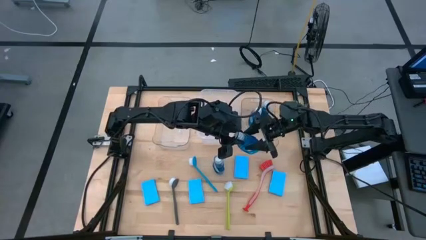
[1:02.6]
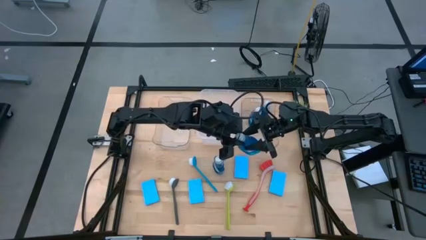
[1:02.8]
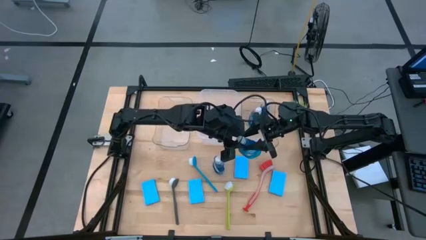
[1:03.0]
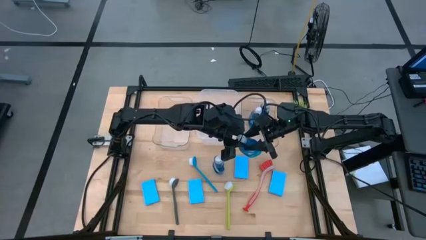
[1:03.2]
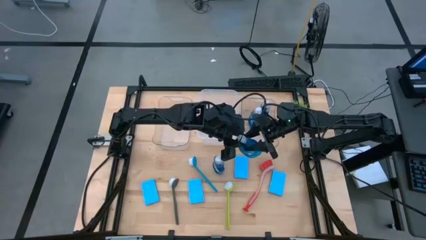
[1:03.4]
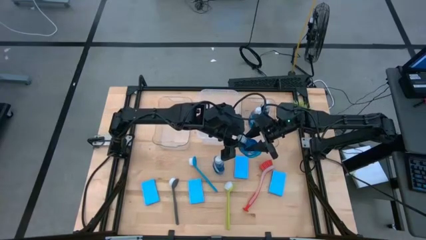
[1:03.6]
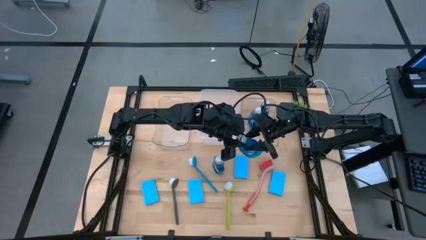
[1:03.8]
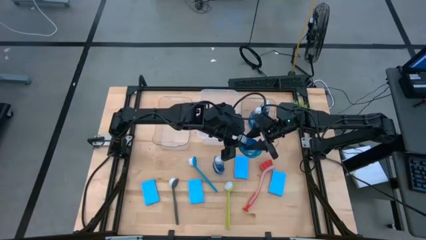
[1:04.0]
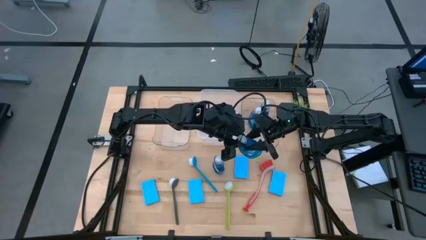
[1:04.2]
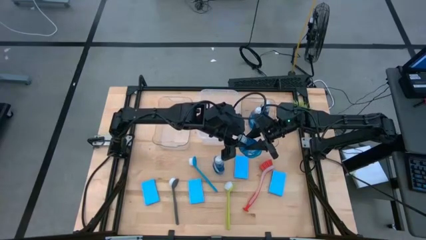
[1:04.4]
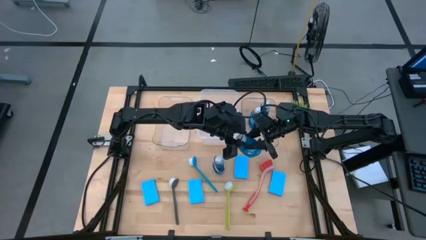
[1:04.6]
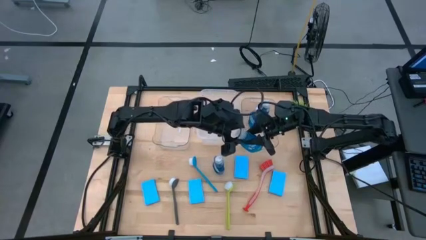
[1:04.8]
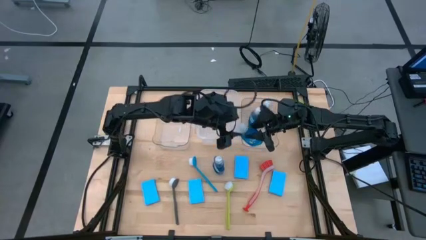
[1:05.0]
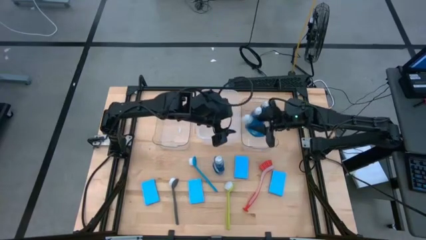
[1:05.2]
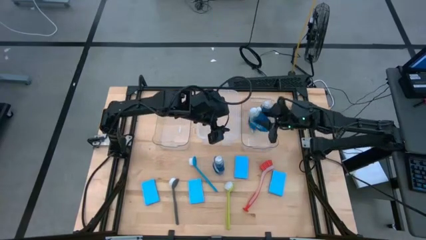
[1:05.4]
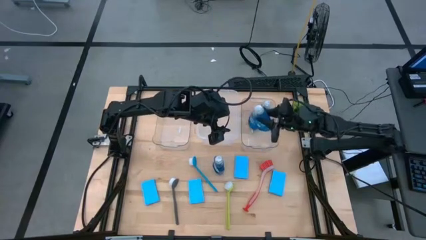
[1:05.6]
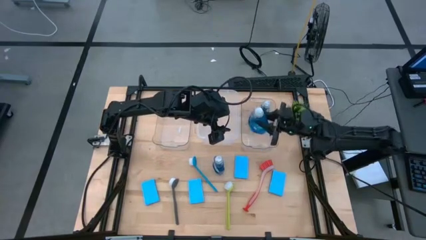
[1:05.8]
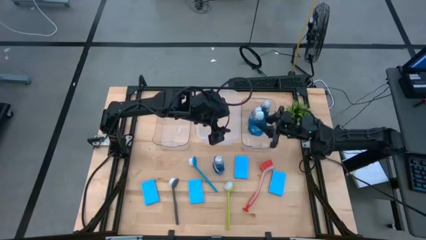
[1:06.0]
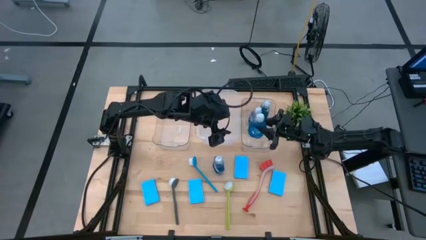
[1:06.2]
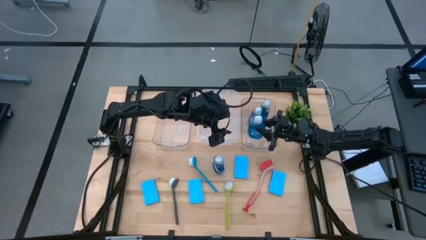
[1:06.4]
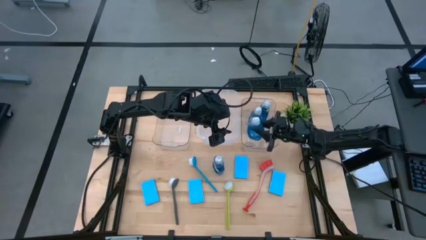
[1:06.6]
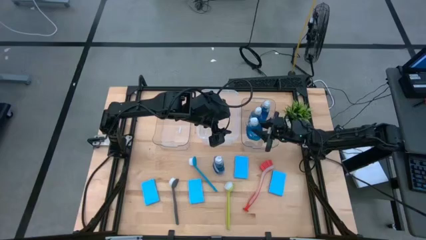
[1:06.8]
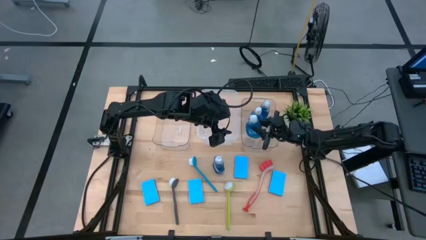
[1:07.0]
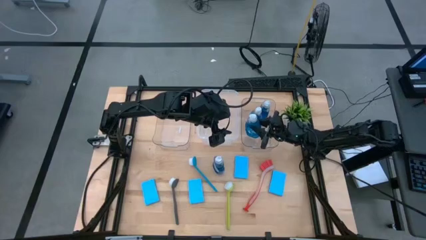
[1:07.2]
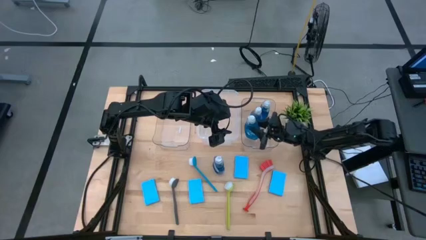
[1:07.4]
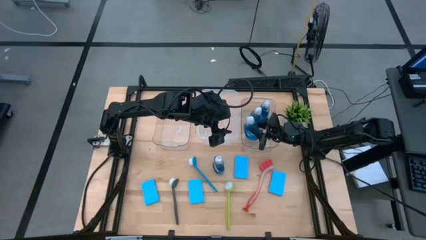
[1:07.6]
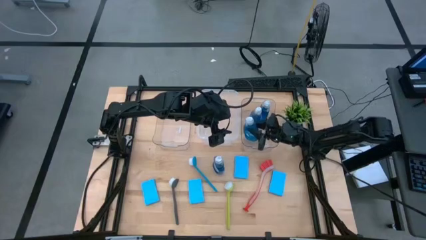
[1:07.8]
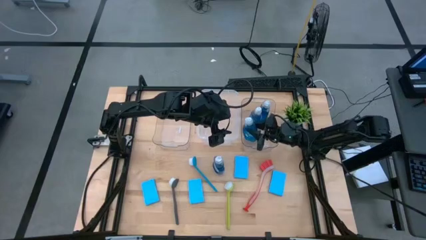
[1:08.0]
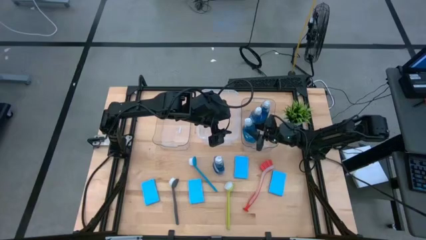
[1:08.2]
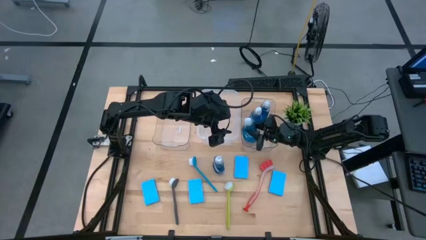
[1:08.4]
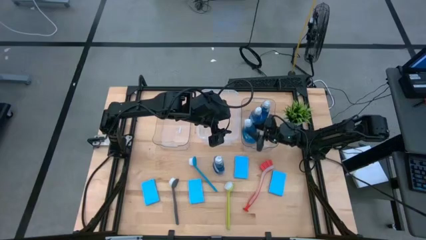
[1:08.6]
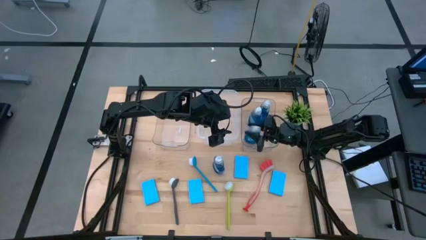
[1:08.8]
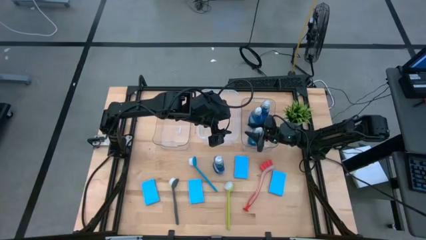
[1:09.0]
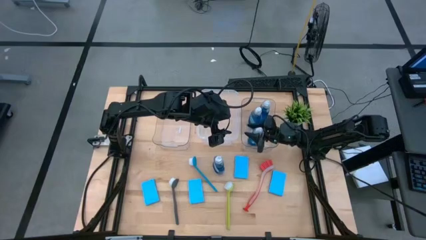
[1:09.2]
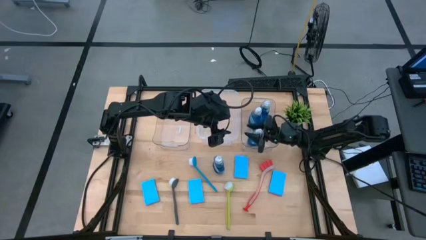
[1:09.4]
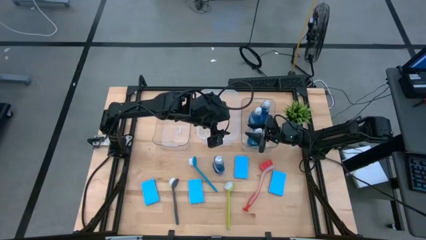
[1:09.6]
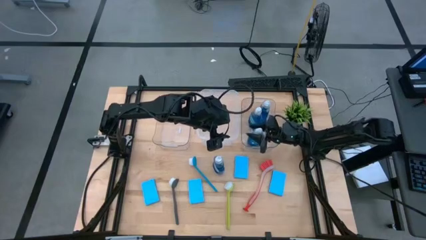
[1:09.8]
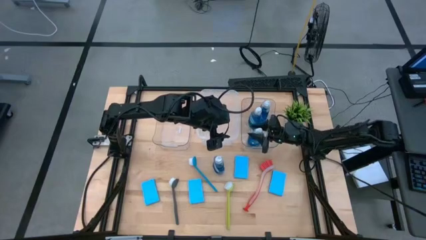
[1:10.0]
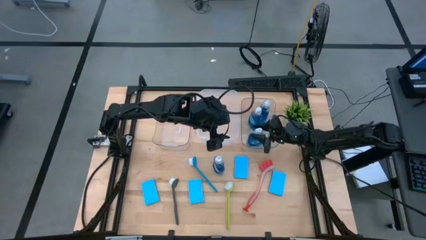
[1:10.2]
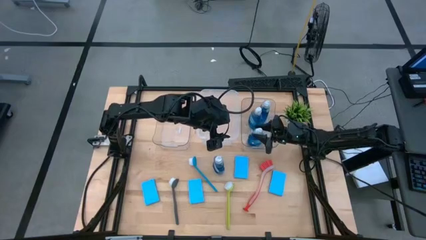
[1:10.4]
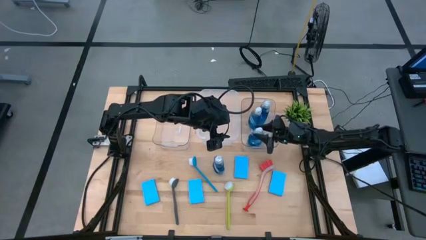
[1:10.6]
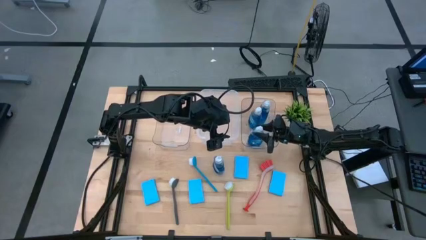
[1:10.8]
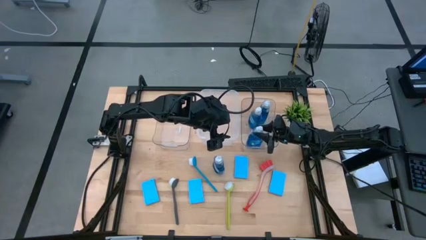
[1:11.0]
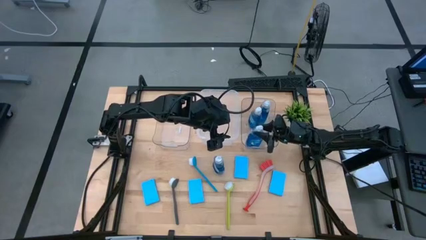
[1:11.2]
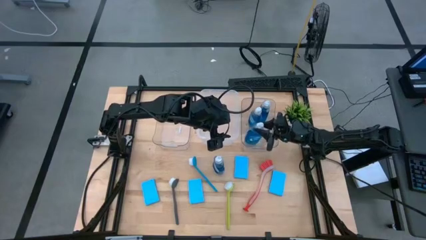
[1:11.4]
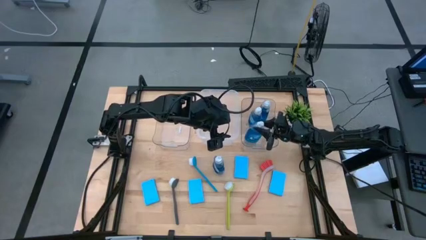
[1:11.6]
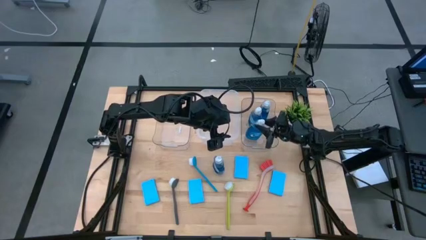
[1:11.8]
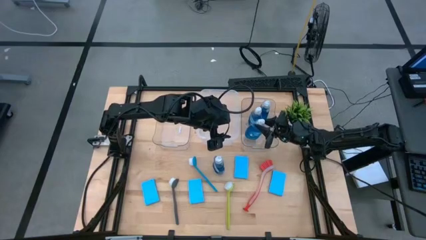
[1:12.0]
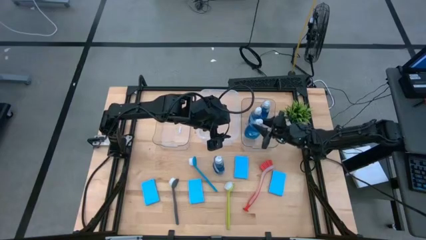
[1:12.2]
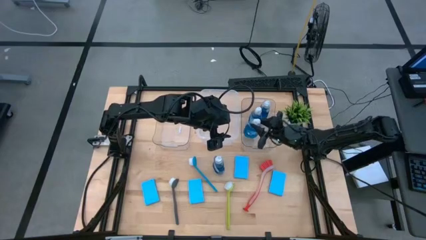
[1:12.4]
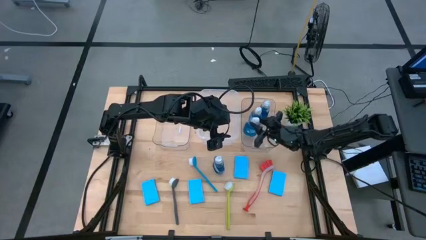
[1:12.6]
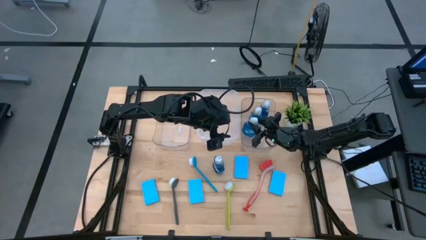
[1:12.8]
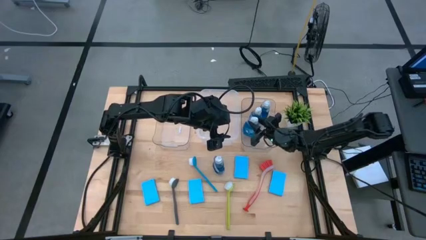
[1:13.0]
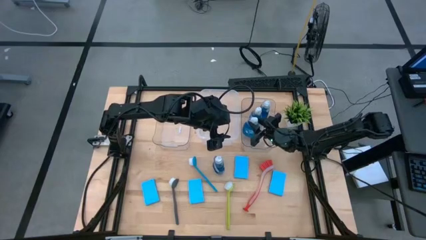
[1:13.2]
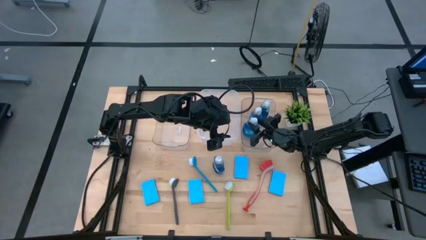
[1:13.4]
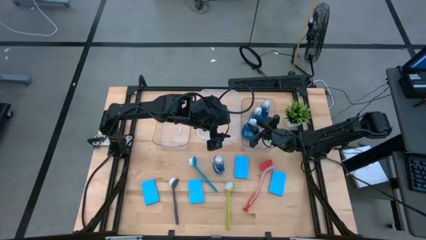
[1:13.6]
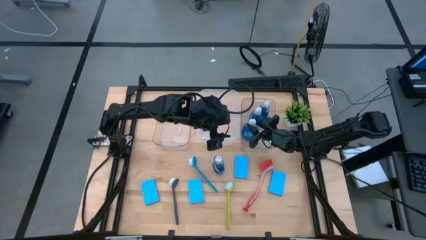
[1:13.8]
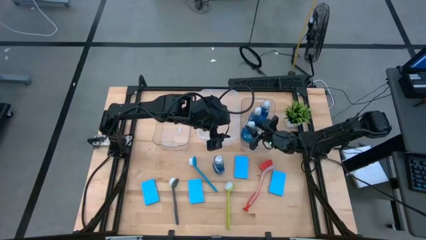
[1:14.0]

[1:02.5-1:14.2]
Task: Pick & Place Kitchen Sink Supplies
Put the blue dishwashing liquid into the right transparent bin
